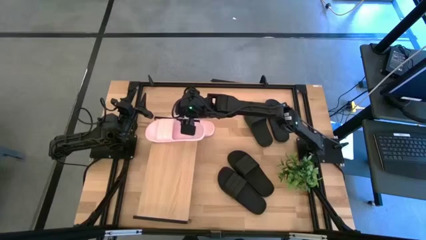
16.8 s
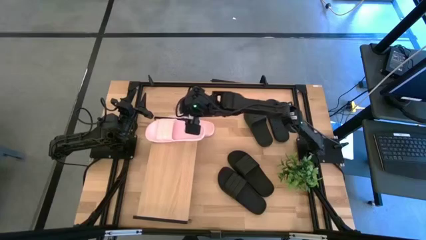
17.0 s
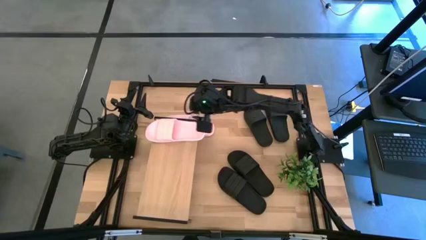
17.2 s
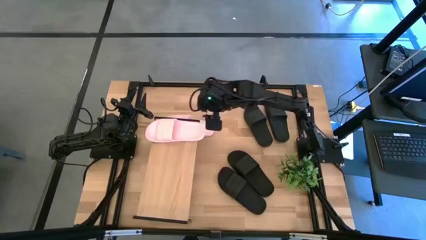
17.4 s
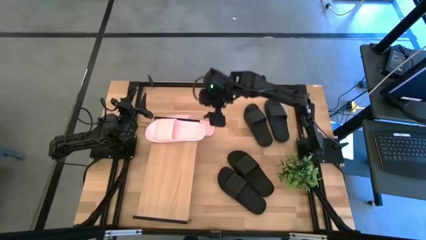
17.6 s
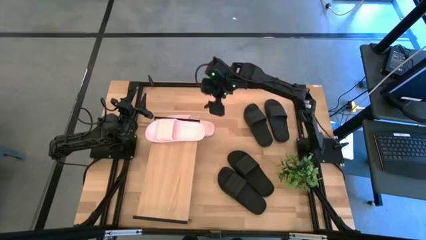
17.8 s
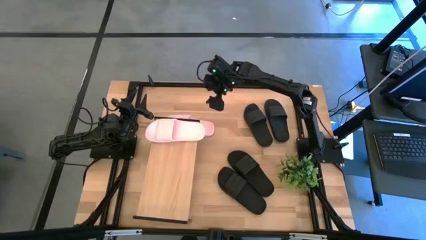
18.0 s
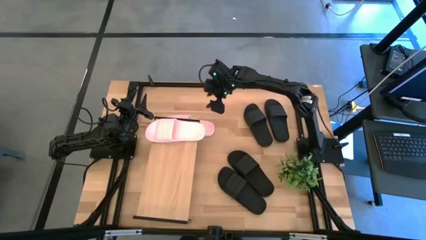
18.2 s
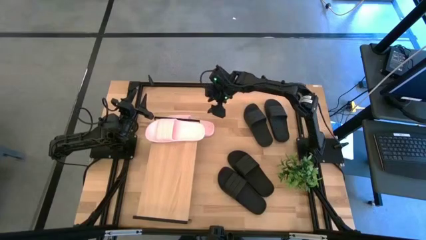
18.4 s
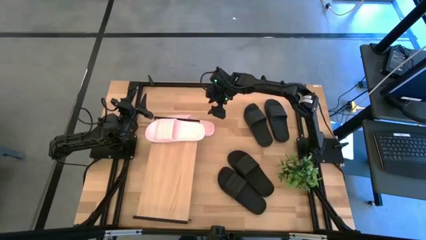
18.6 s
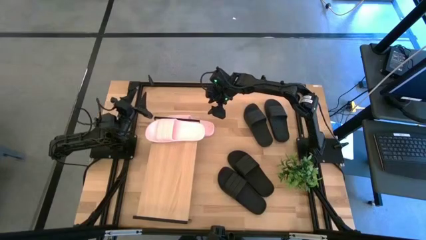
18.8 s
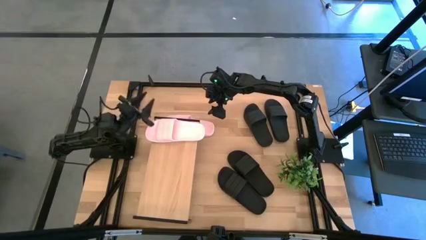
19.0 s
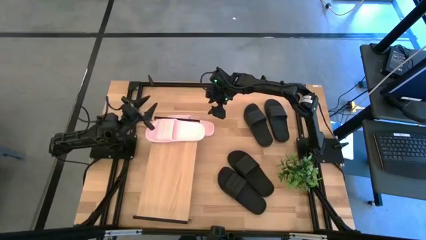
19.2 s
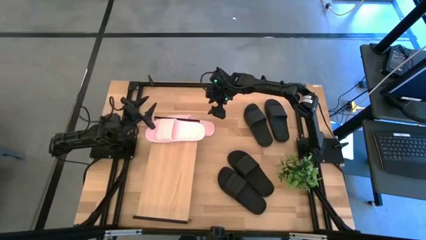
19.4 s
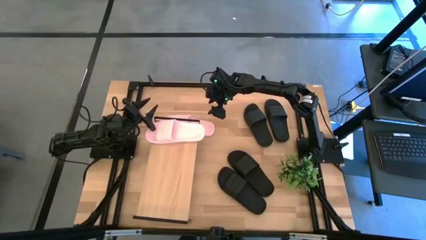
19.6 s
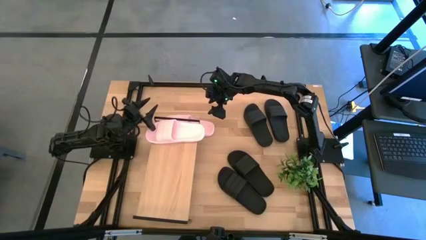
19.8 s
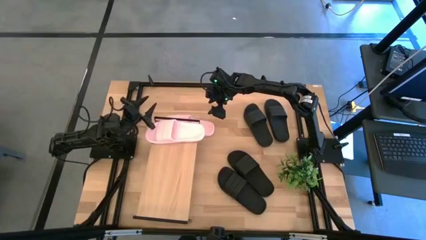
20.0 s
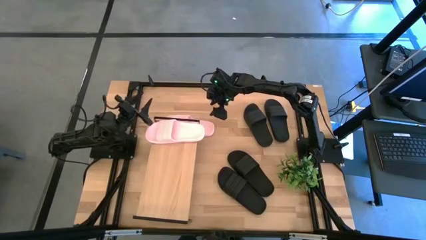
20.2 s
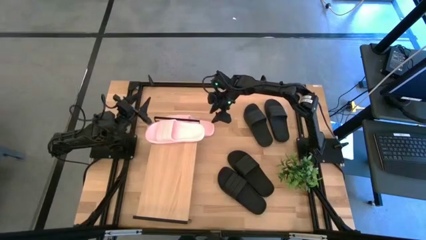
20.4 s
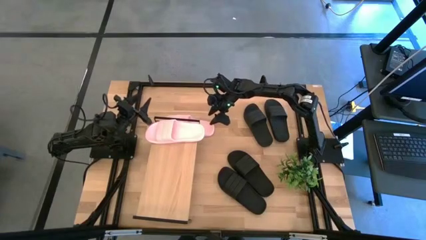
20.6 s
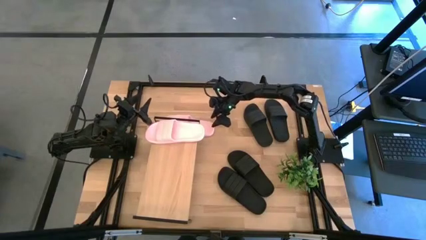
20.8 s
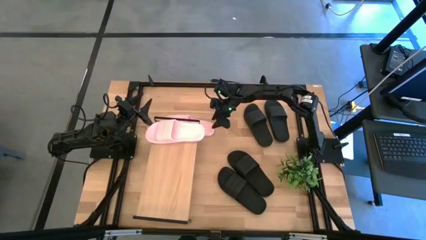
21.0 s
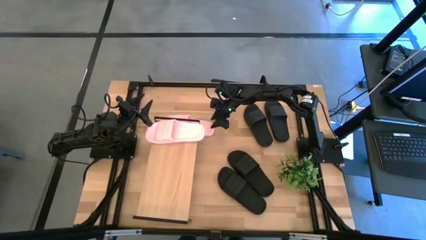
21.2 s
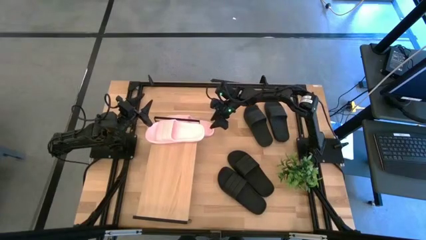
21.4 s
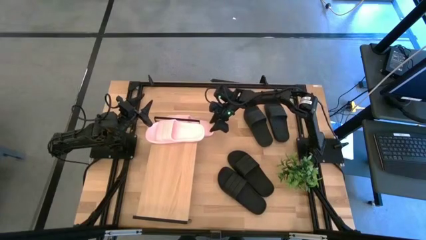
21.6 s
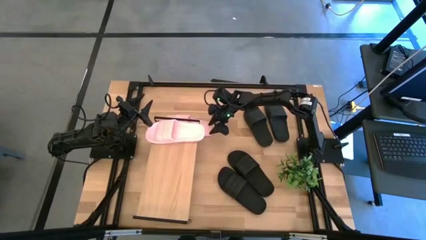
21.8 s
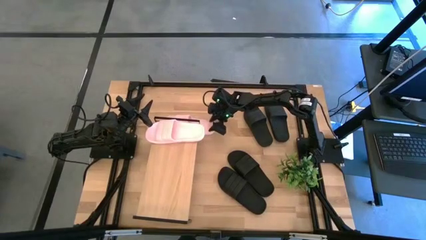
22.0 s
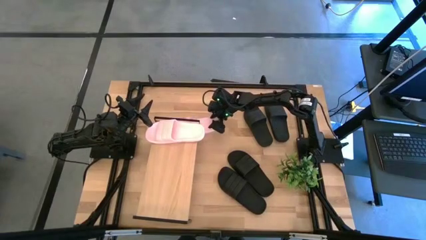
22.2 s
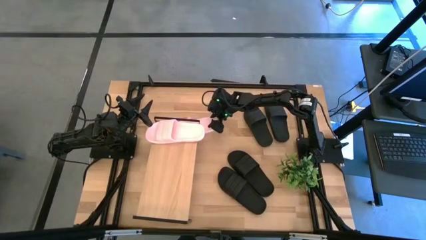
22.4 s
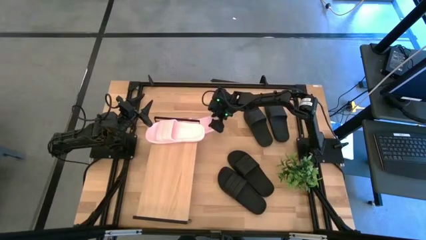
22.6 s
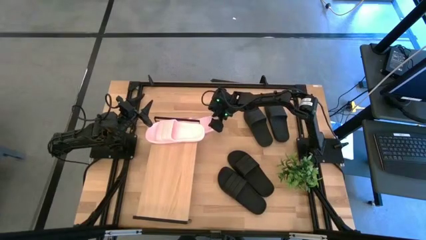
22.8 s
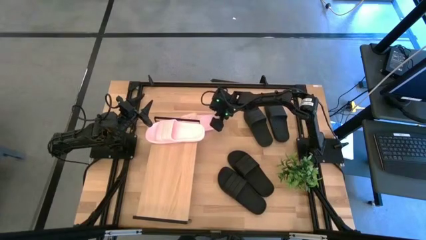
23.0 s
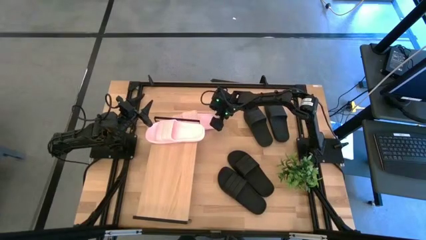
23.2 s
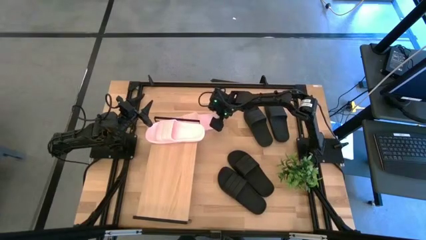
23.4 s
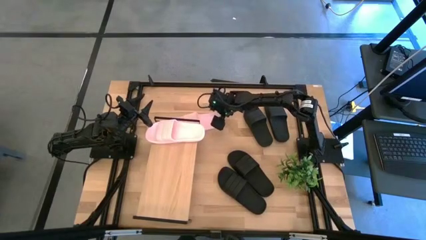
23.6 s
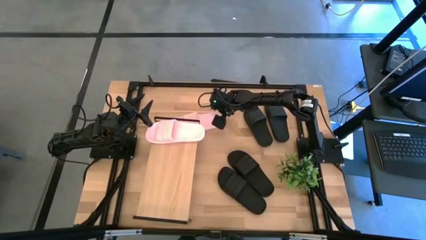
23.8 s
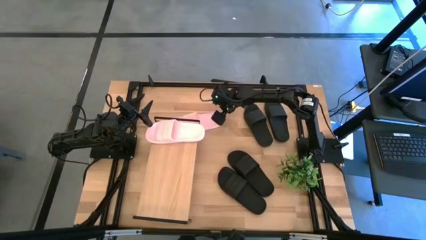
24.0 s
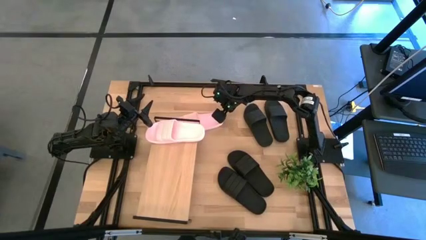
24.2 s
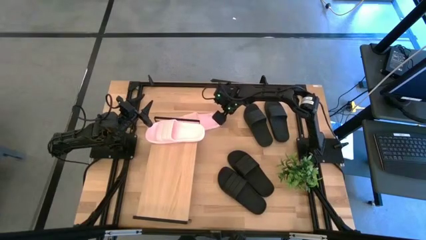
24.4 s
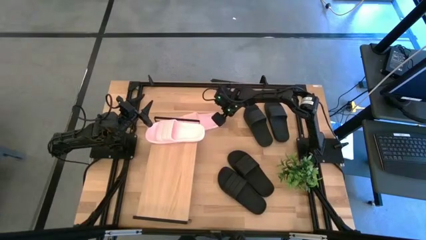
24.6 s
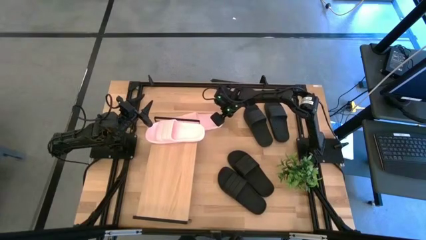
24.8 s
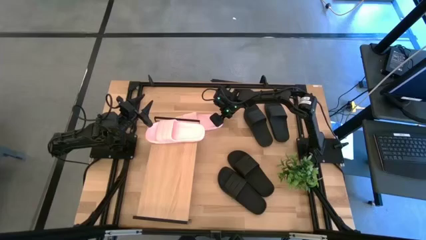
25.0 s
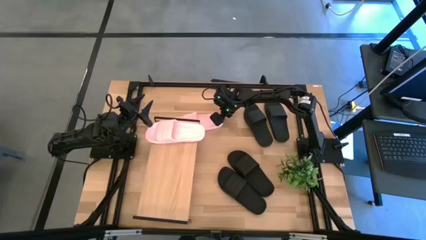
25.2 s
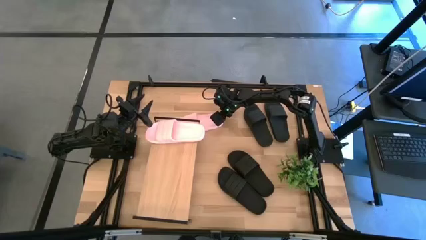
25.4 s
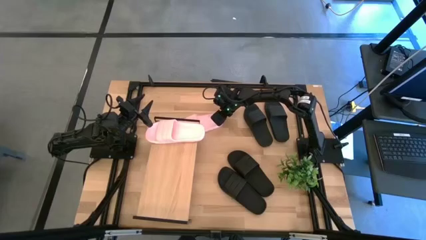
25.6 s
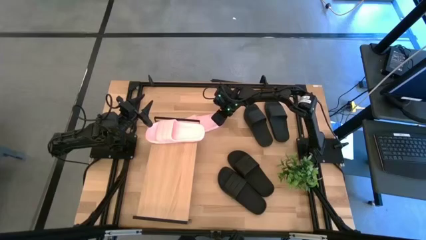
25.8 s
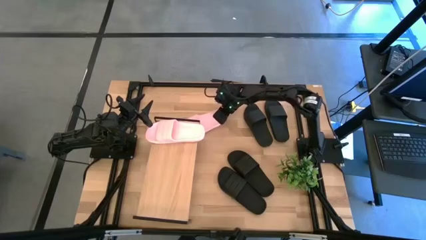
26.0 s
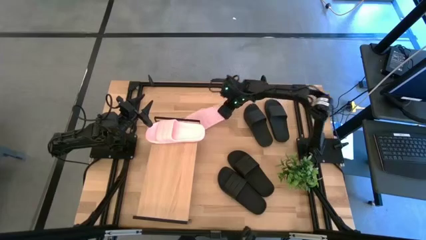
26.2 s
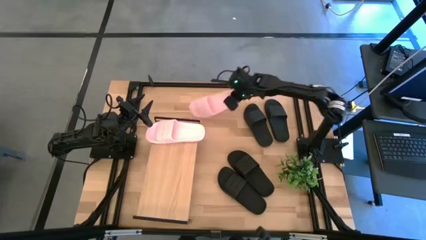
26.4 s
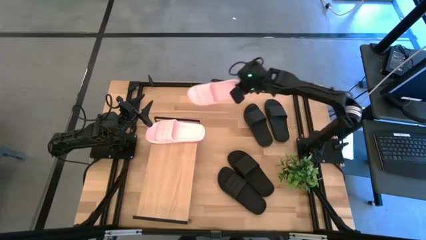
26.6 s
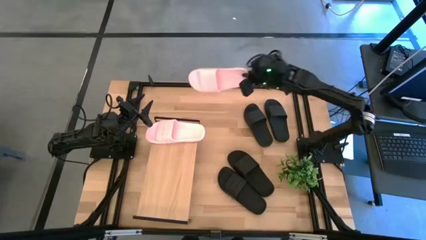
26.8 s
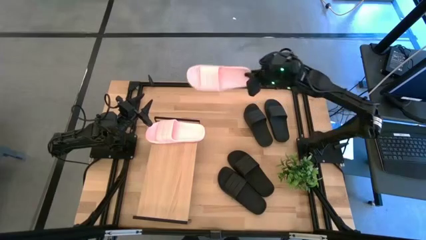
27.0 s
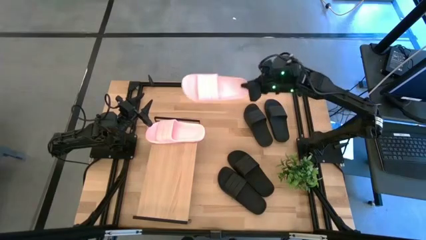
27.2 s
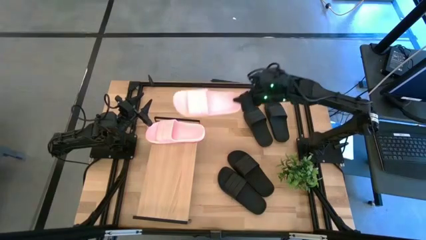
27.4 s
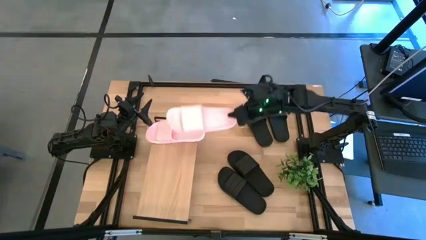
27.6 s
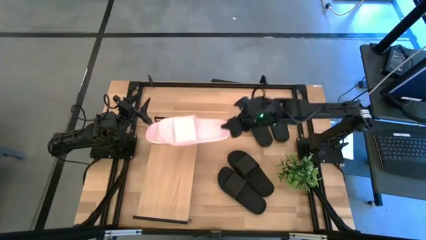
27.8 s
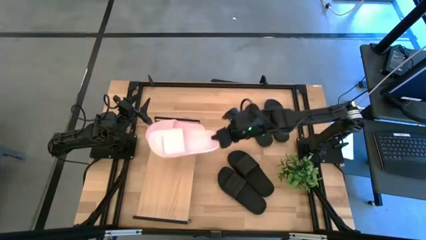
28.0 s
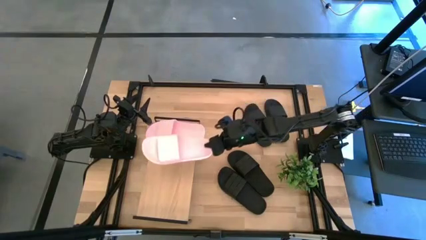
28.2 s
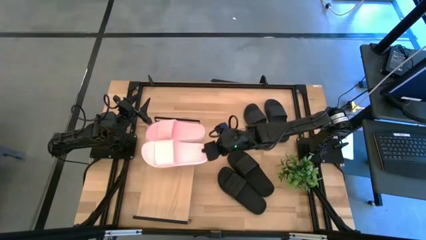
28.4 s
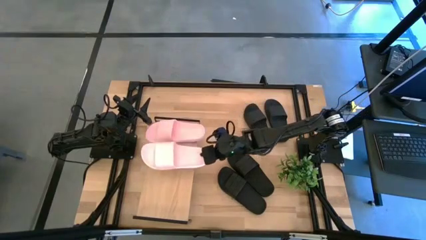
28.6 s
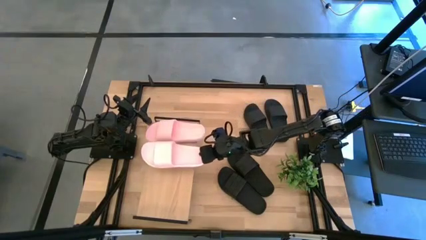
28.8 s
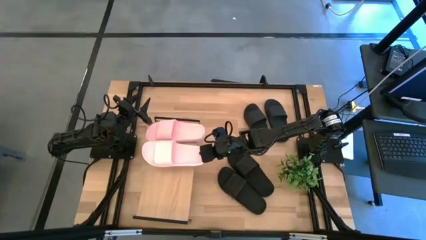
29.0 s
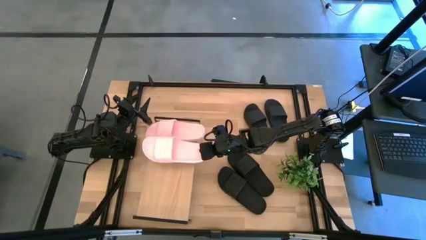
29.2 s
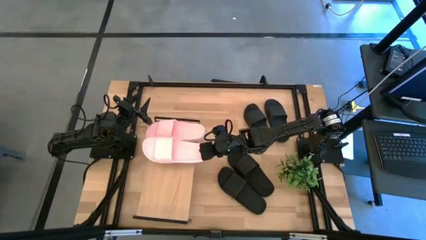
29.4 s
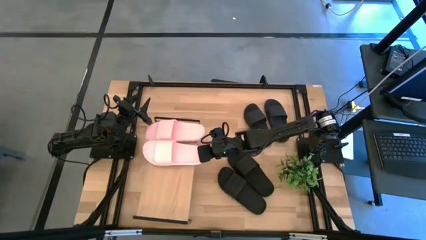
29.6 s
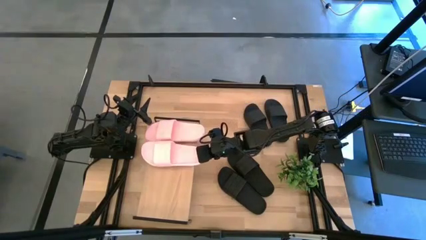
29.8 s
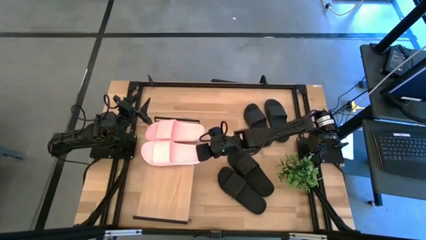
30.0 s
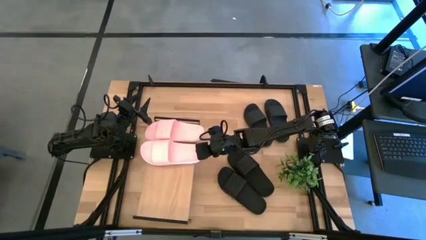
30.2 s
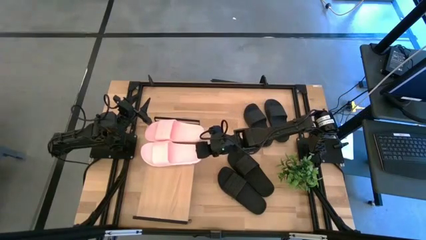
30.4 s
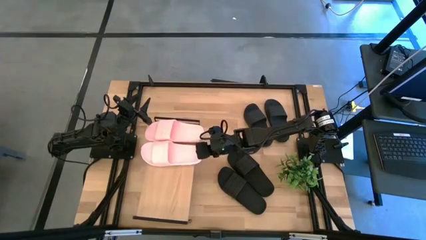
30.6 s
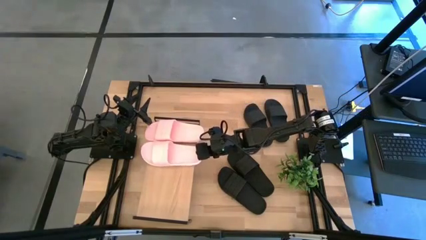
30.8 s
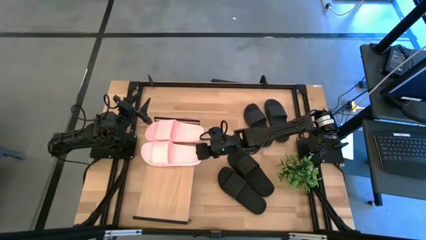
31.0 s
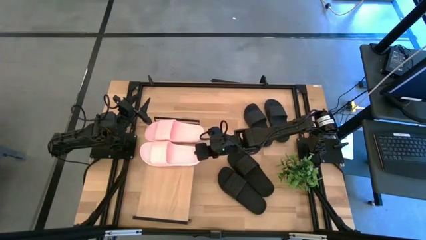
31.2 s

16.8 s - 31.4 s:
Task: Pick and place slides into the shelf
Put the pink slipper on the shelf

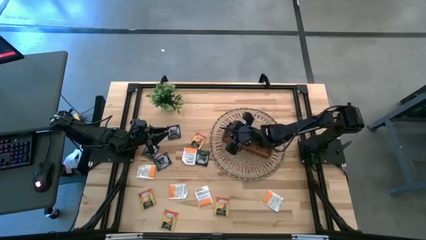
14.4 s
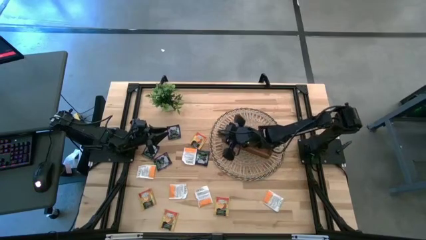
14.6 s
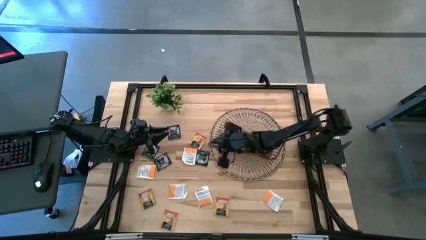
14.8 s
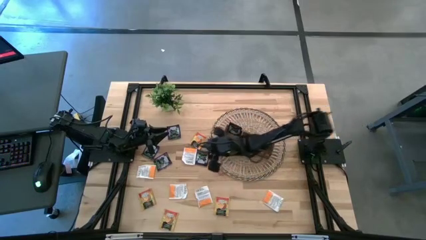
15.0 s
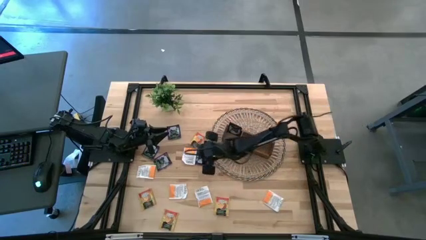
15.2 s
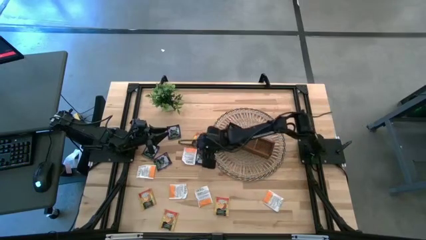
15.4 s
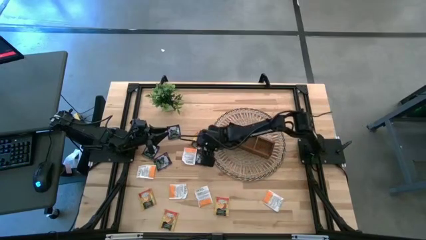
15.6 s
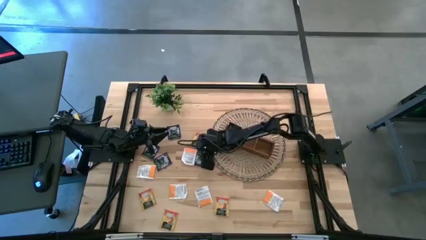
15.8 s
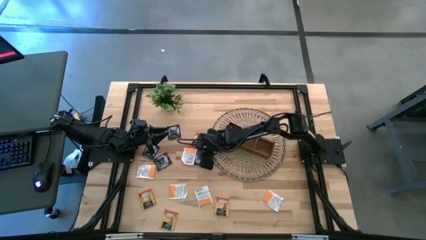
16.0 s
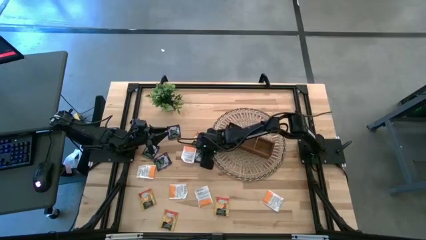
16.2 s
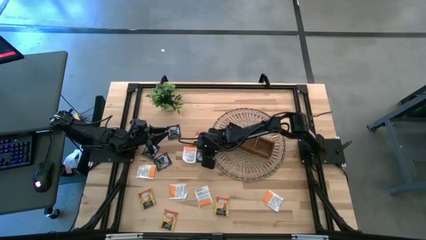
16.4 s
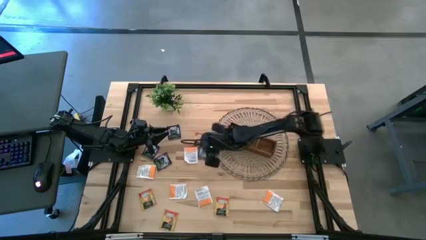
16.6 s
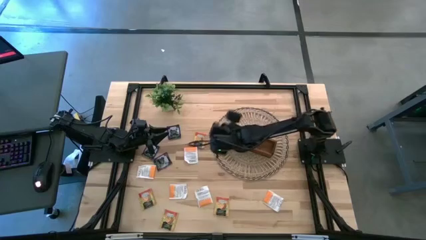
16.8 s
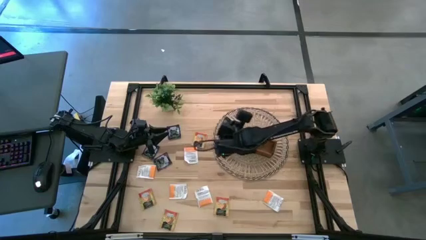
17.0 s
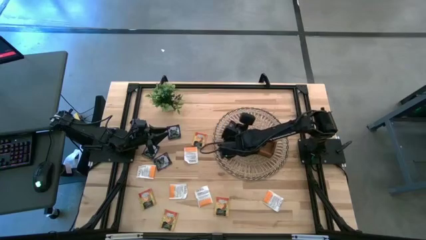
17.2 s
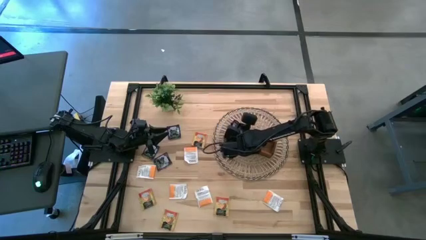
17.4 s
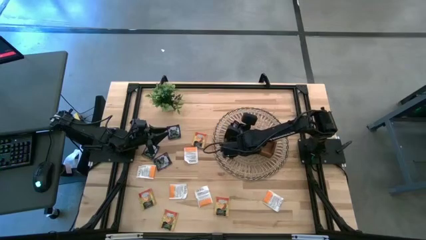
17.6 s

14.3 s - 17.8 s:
Task: Pick & Place Tea
Put the violet tea bag into the left section of the wooden organizer
